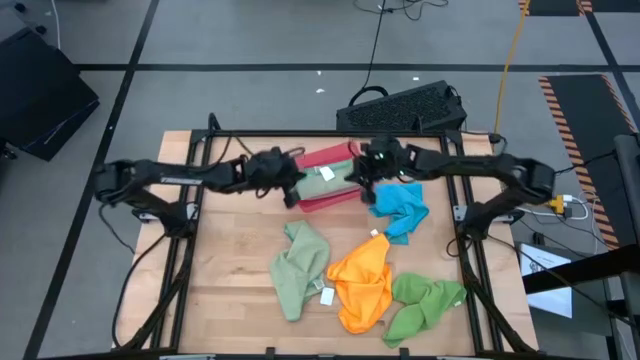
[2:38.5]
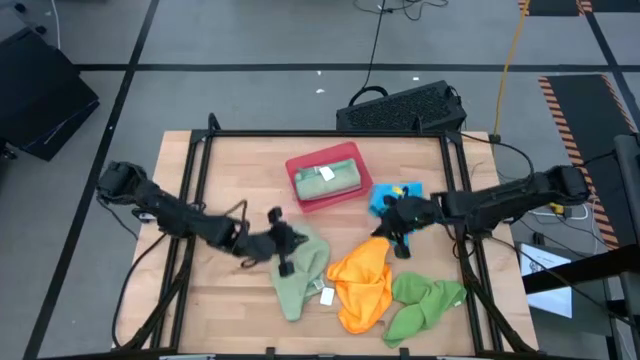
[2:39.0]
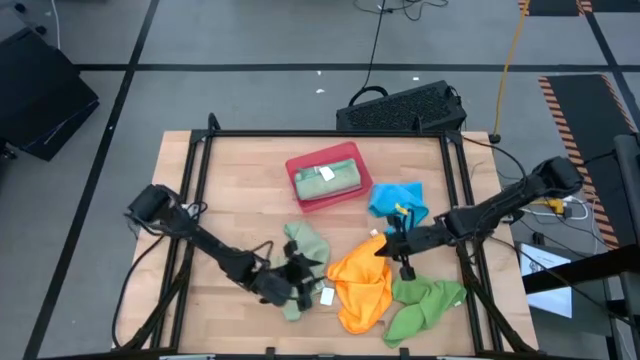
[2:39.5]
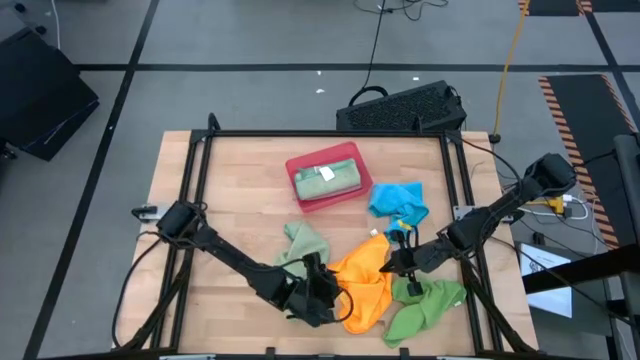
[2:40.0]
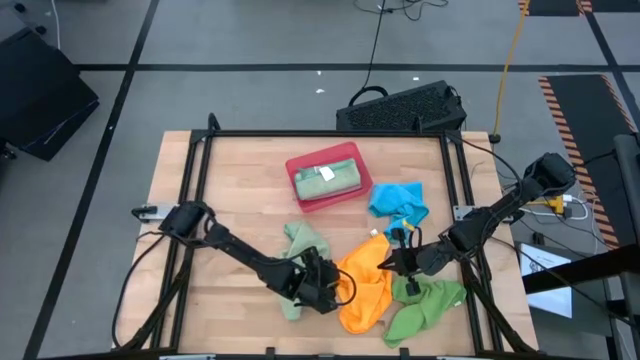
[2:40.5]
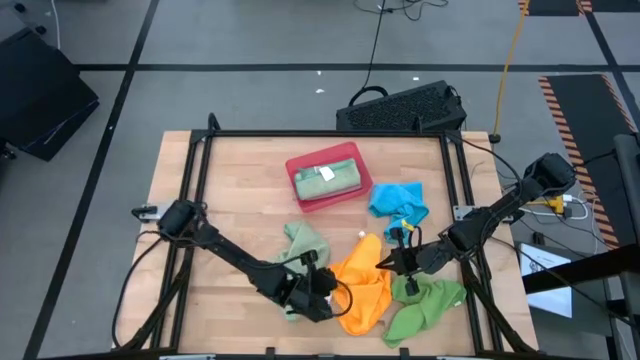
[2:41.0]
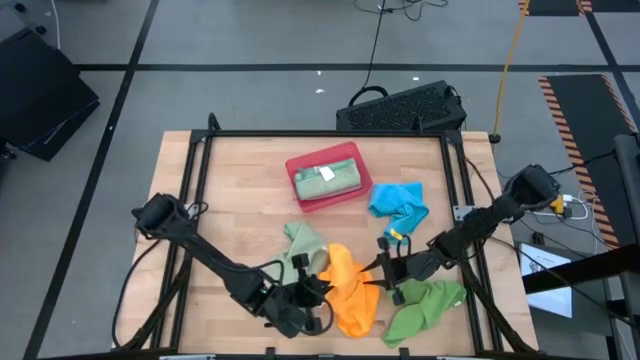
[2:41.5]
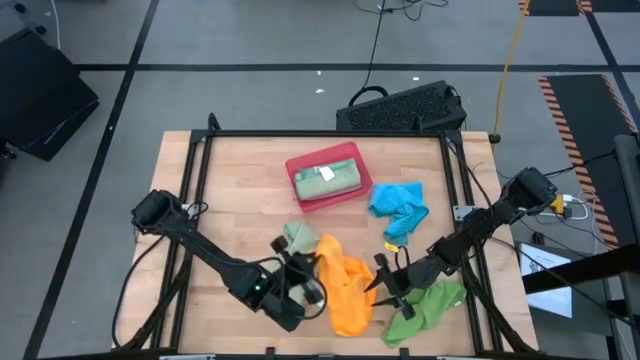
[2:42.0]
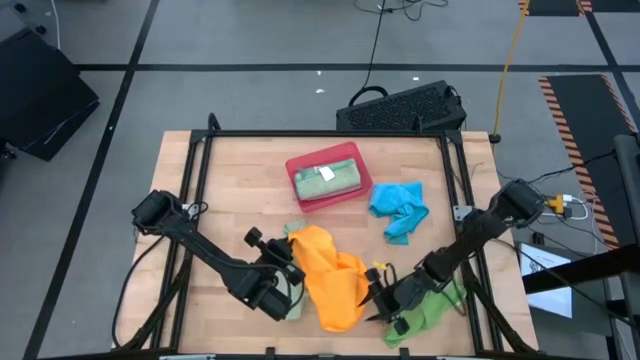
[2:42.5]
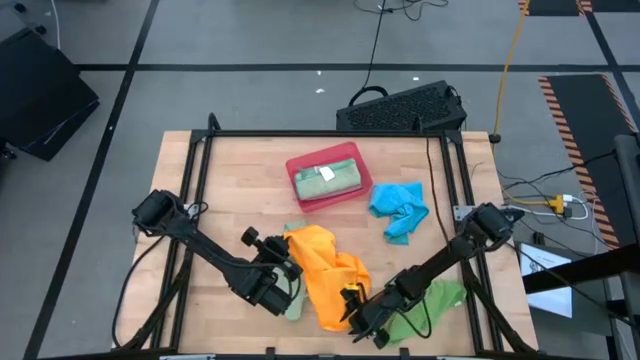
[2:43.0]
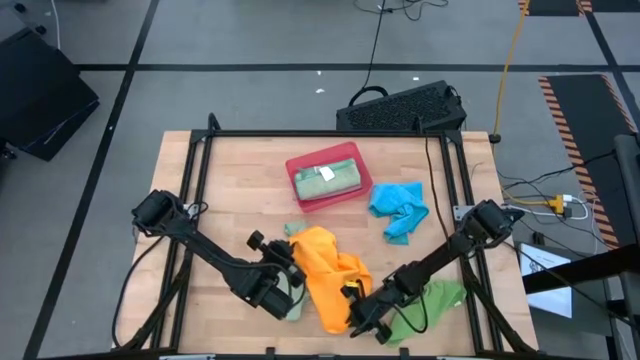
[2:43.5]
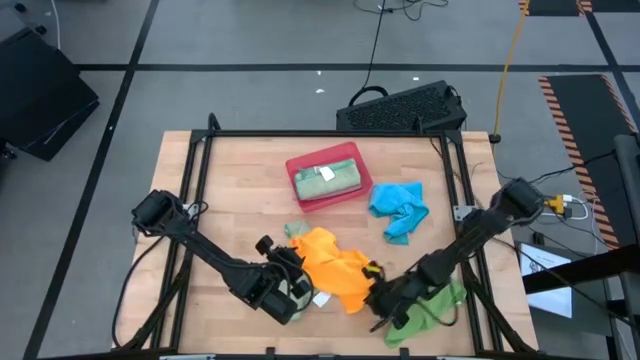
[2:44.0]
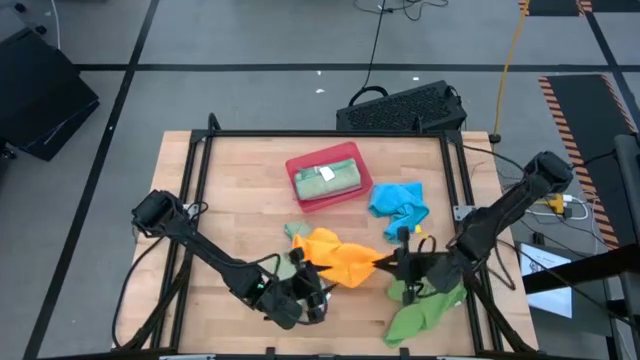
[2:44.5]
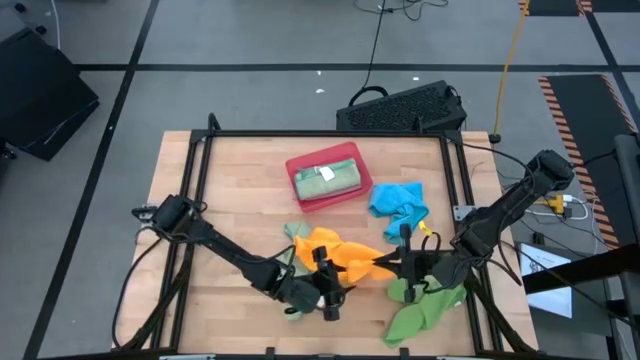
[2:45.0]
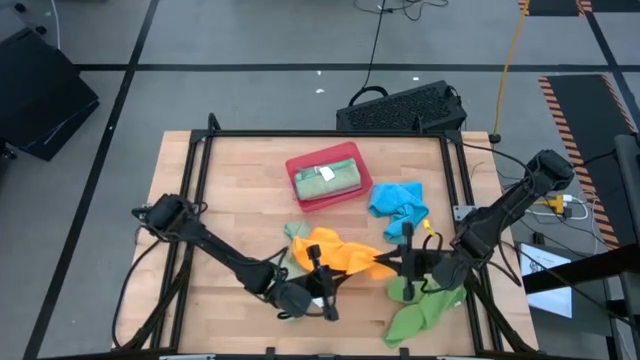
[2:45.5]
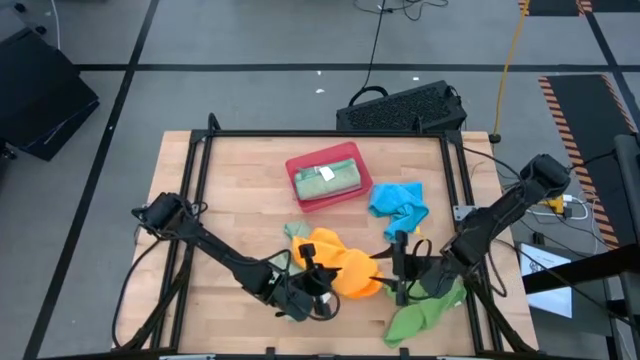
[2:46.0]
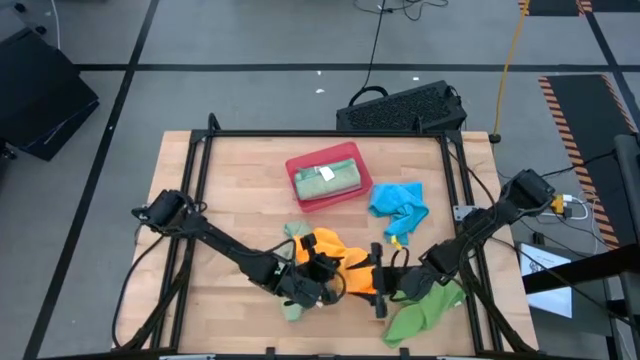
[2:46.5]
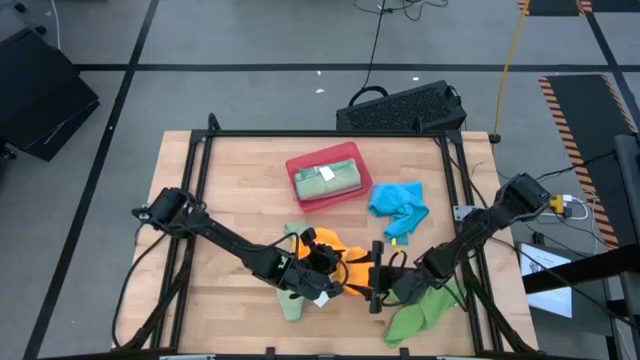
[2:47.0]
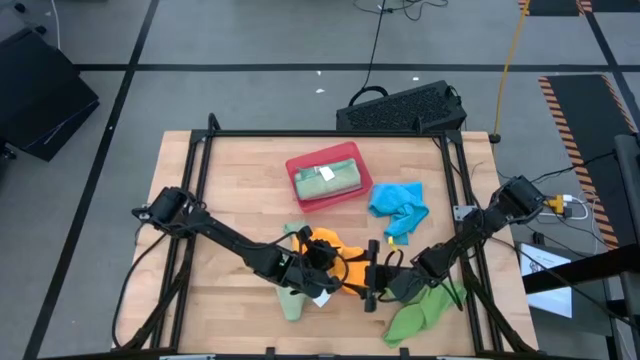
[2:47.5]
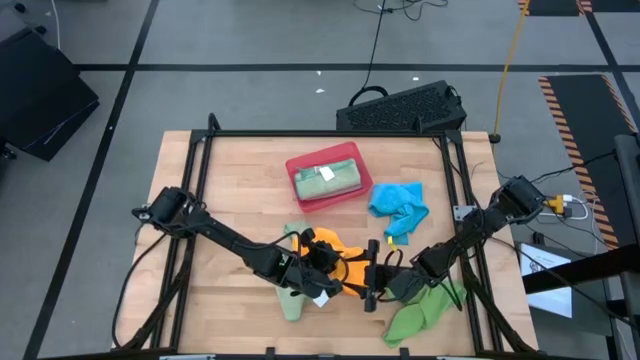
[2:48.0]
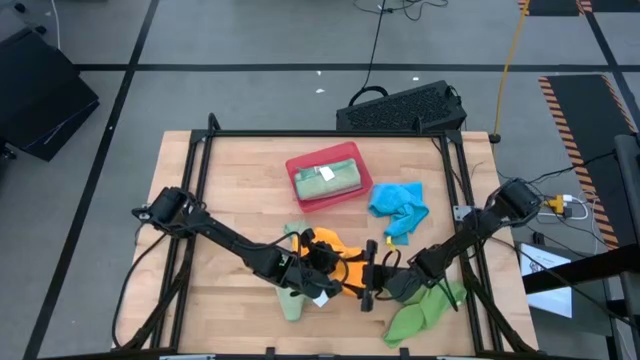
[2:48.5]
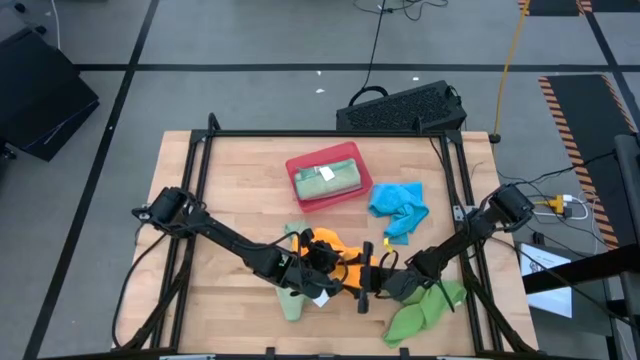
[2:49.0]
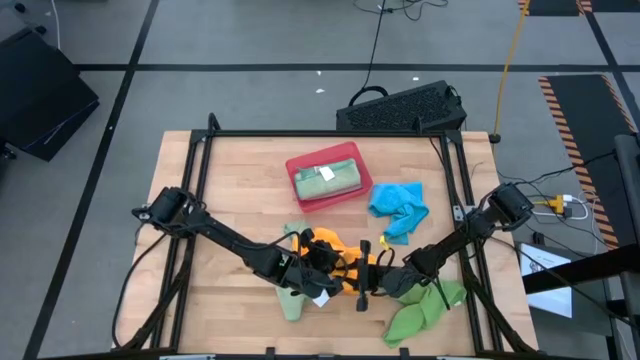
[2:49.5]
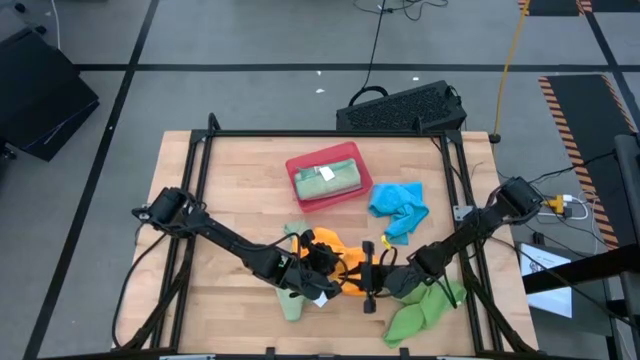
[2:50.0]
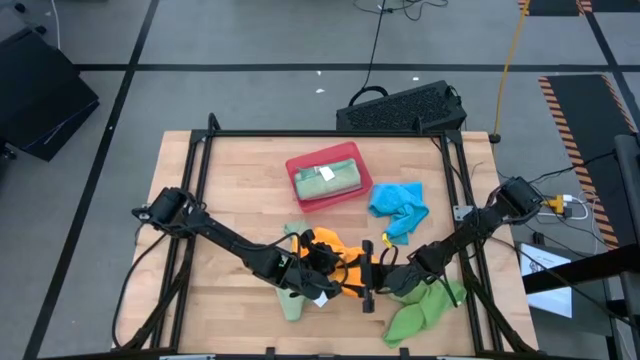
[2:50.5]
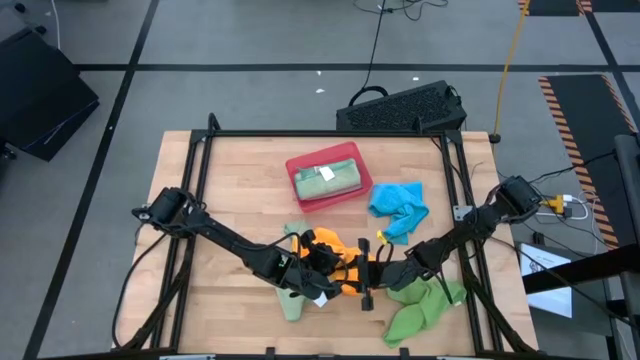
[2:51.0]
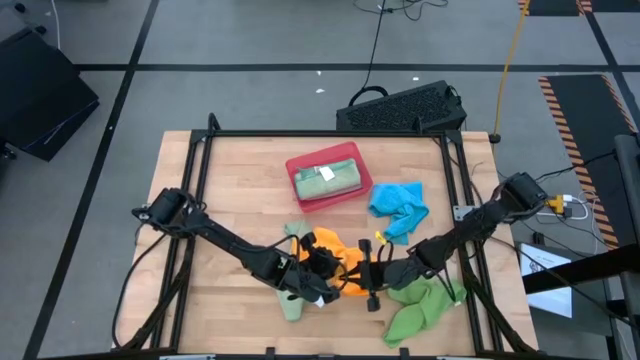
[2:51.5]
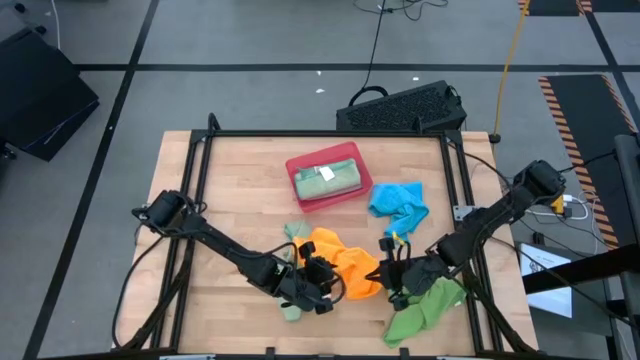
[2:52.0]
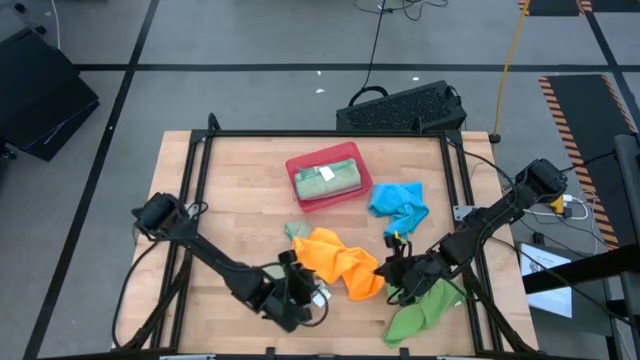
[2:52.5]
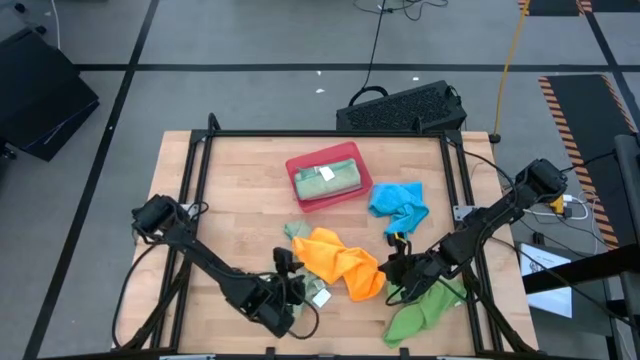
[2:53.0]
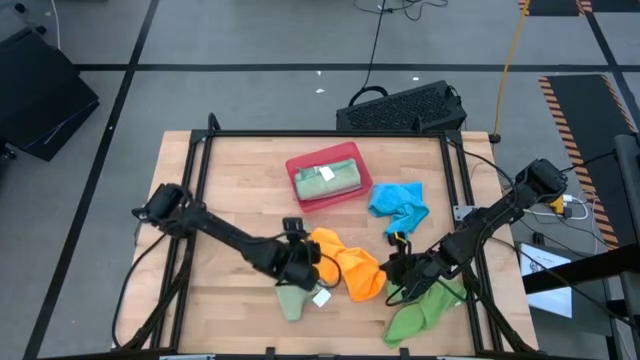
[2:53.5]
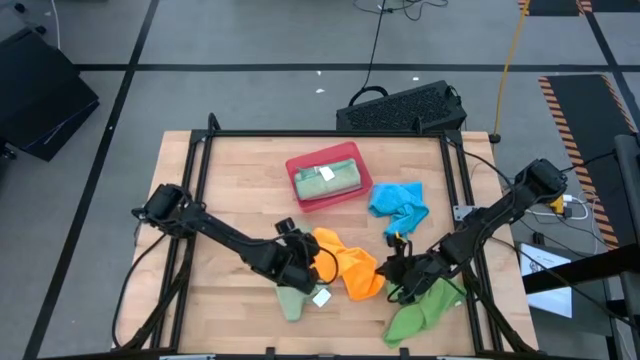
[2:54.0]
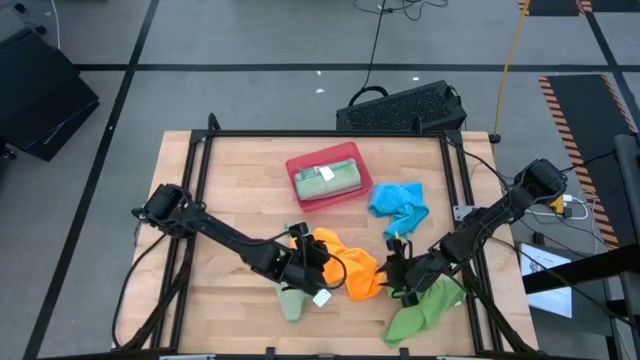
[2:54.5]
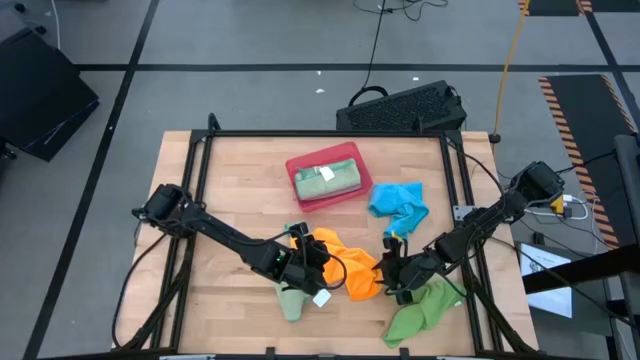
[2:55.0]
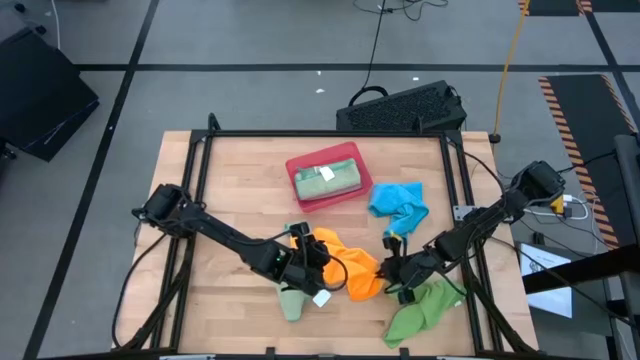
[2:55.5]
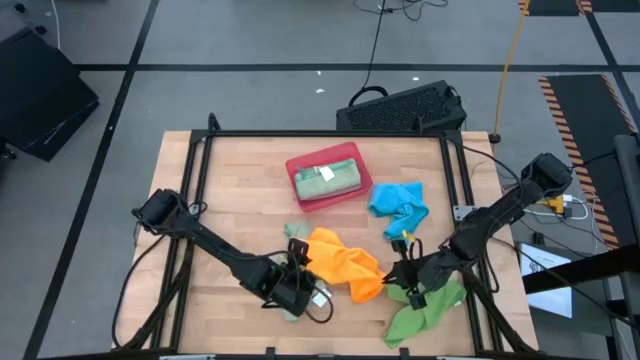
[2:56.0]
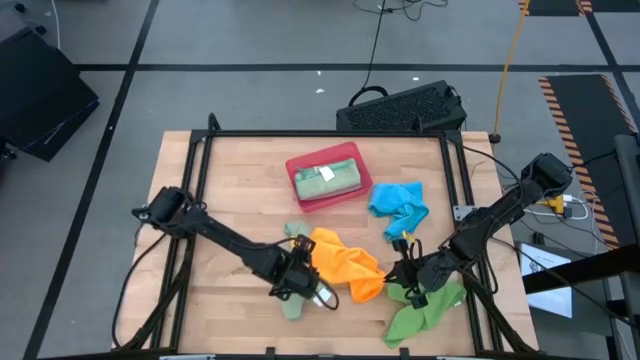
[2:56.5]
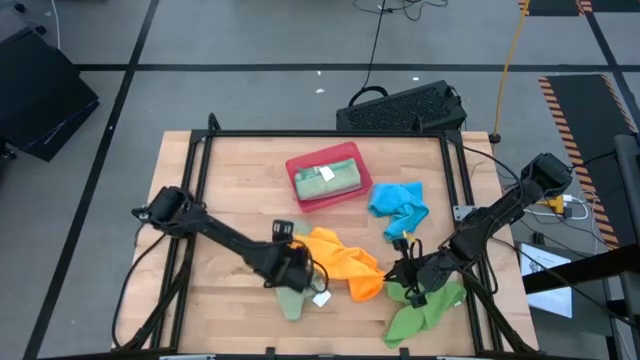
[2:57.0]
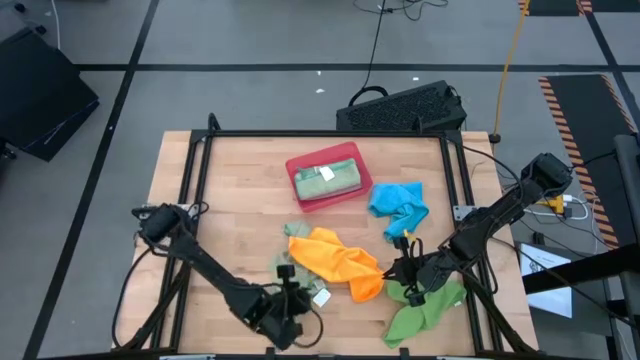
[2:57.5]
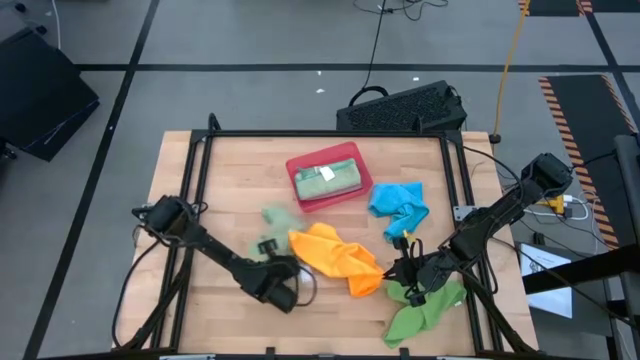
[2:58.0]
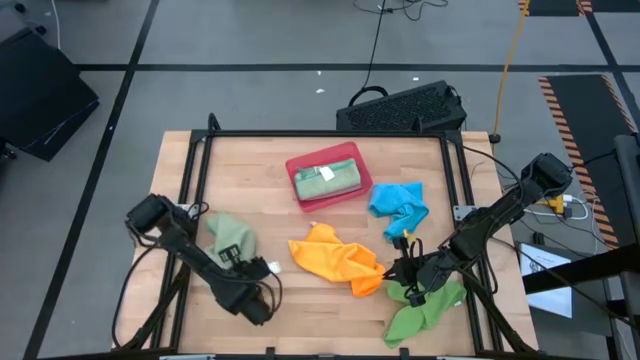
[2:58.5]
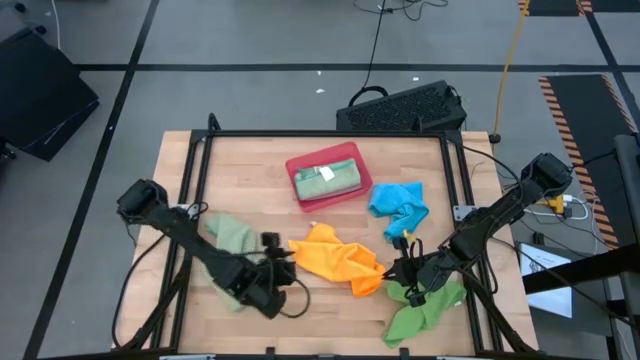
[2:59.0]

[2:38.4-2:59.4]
Task: Fold microfiber towels
Fold the yellow microfiber cloth
